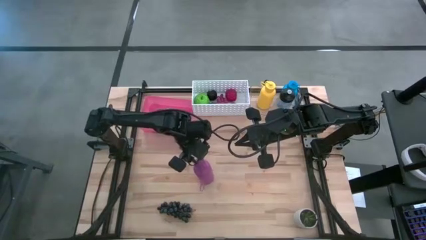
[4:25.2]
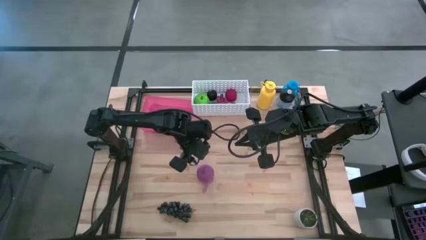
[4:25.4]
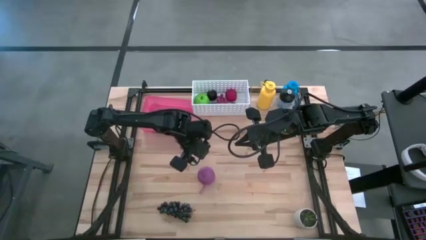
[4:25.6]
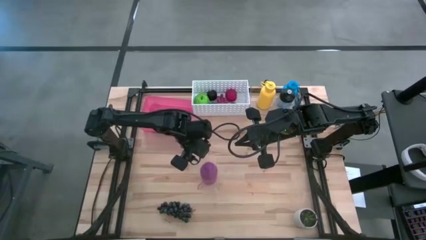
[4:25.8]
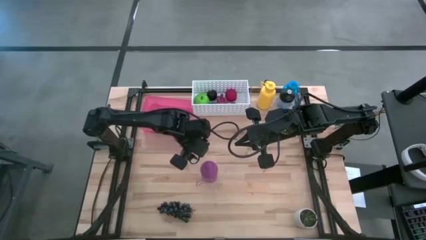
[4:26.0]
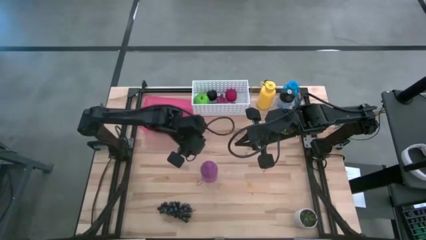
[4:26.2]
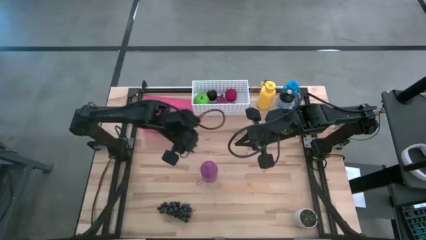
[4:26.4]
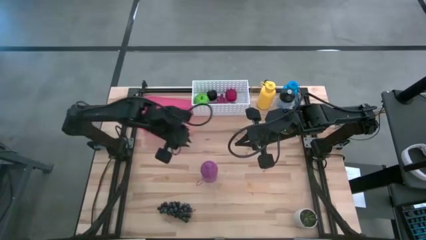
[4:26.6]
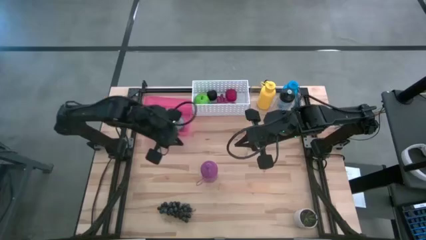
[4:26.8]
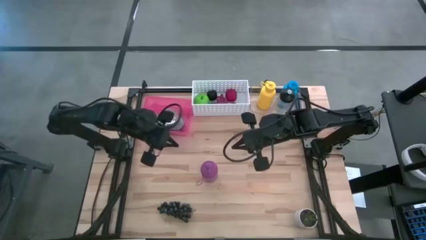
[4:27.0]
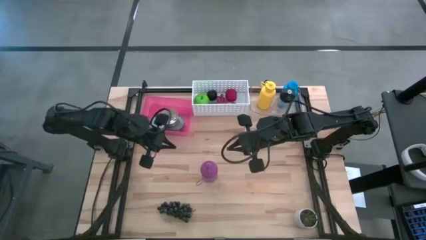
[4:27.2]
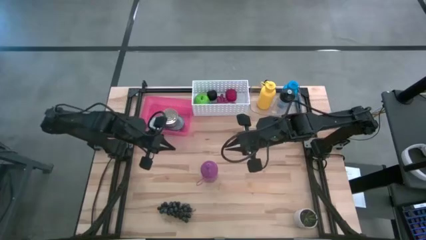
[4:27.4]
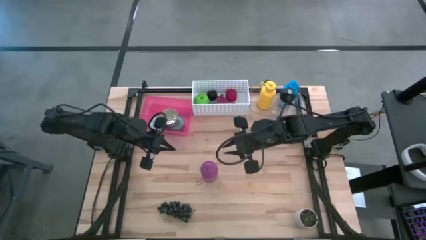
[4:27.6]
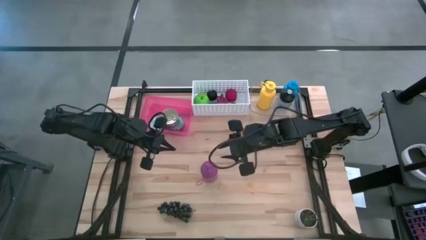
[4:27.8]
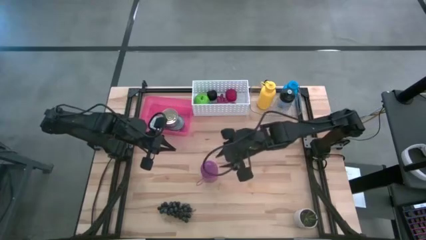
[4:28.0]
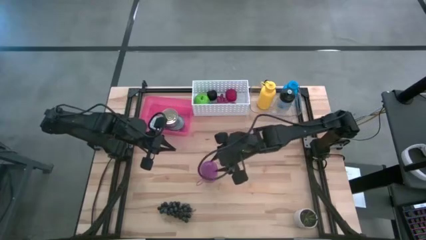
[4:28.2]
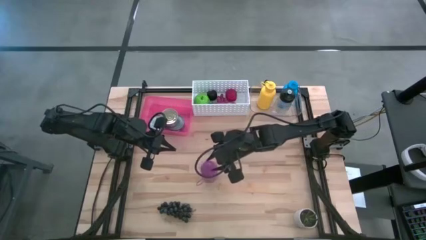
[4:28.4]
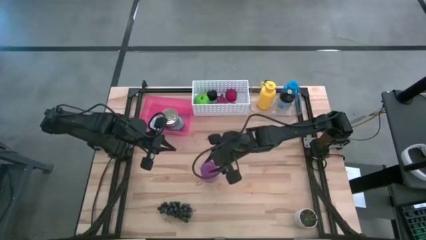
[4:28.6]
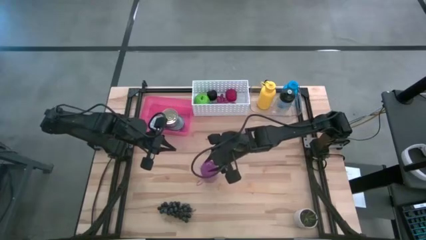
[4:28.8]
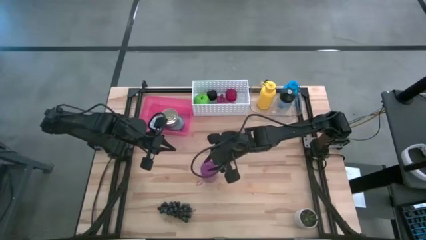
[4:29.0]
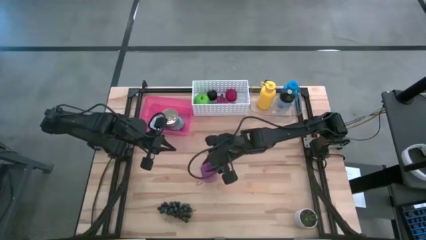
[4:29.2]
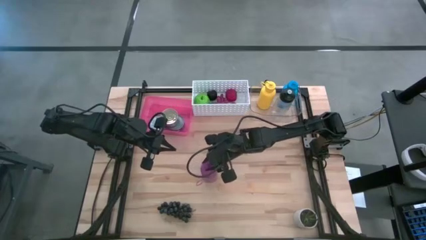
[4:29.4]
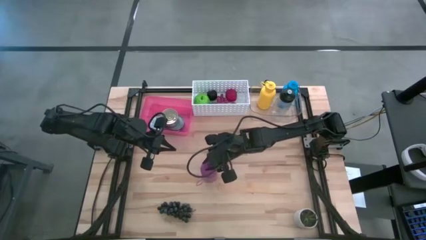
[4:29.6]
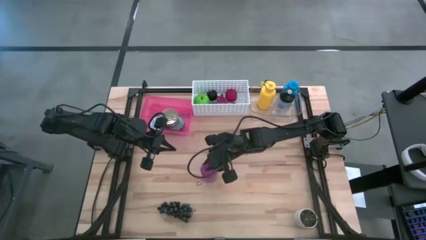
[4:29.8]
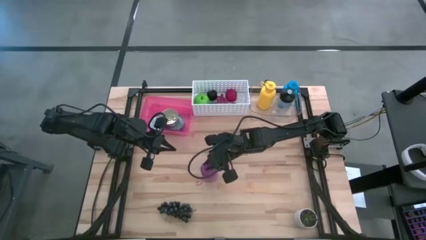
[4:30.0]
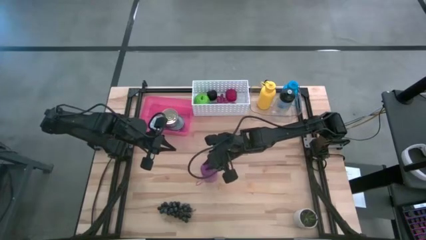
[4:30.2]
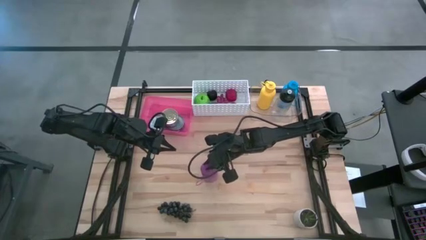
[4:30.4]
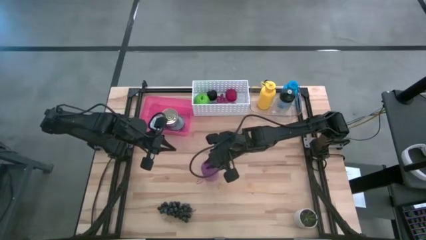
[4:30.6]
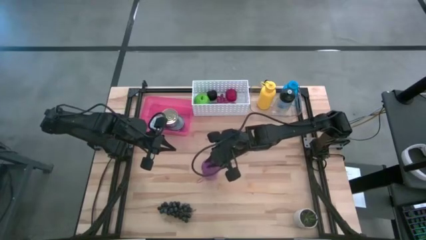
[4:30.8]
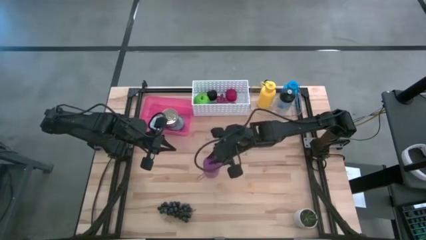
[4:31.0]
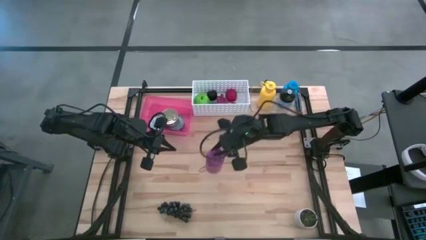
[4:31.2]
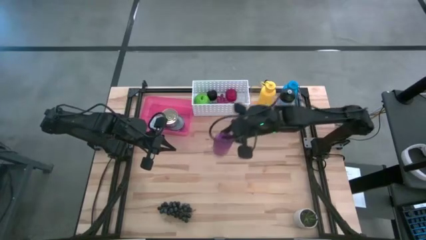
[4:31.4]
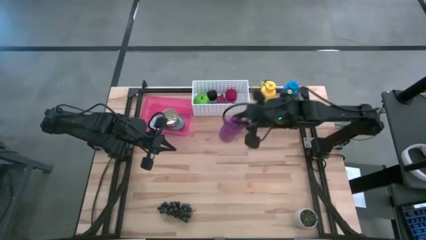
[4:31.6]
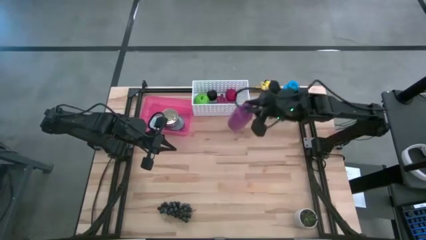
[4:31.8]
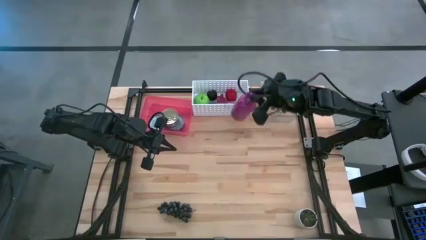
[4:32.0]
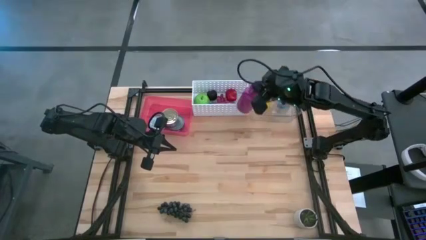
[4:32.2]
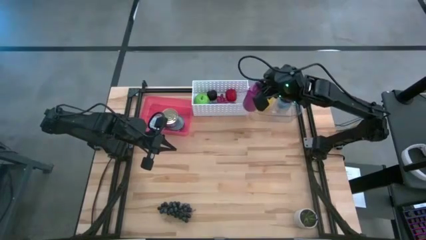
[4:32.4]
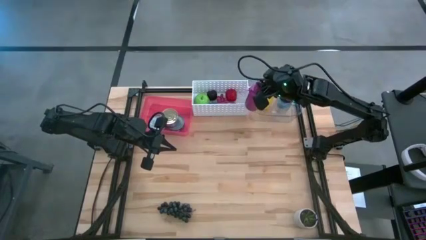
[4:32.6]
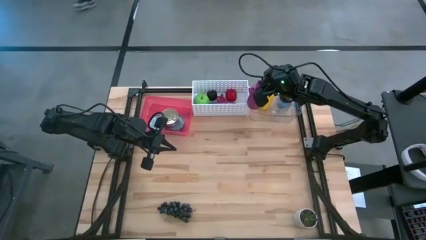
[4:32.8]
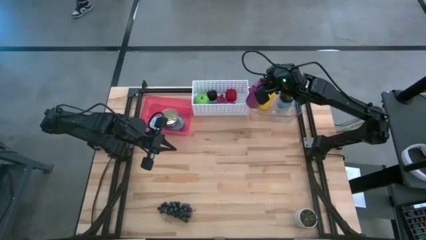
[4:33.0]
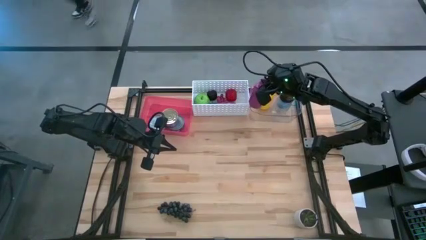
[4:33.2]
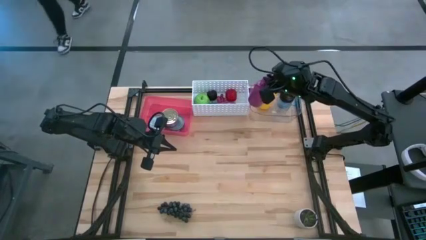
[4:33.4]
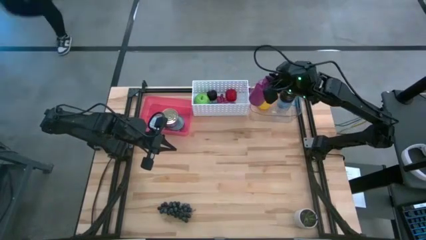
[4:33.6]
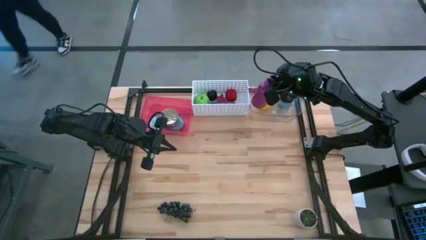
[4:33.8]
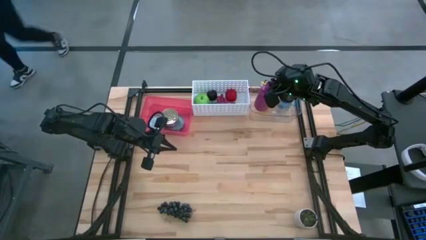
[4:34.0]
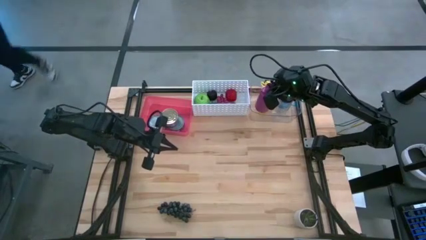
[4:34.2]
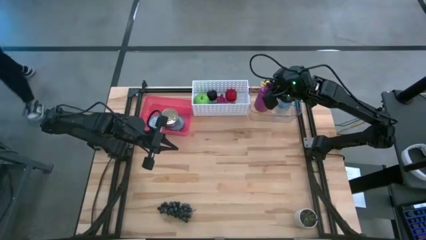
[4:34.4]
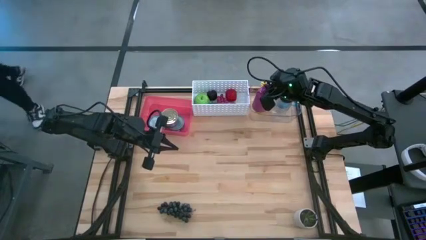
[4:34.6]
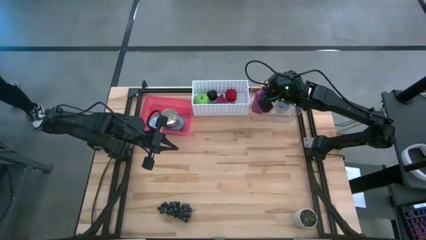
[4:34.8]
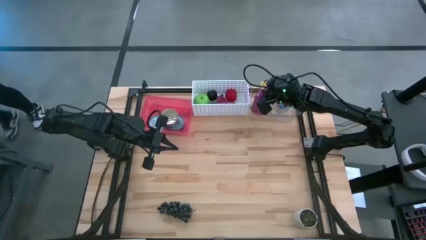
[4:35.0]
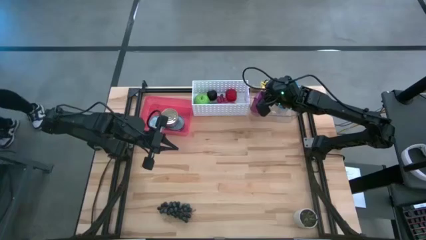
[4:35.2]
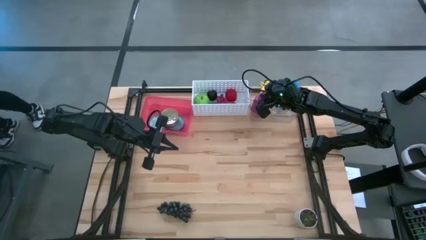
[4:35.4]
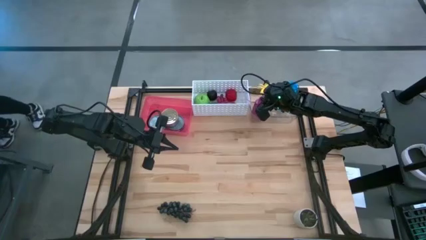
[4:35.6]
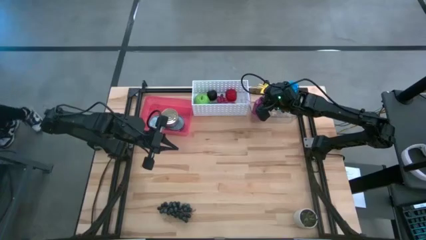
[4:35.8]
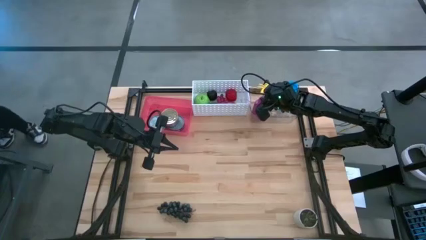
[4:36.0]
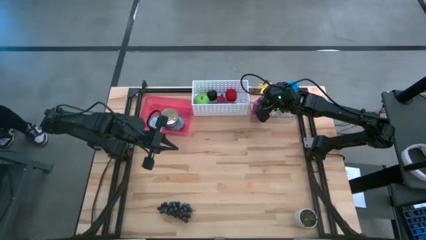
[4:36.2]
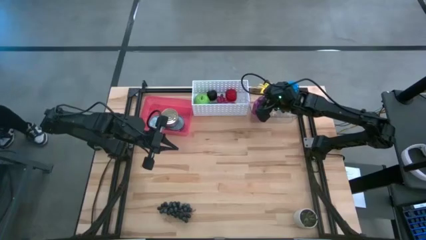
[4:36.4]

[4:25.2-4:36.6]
Task: Pick & Place Food Item
Put the purple water bottle into the transparent bin

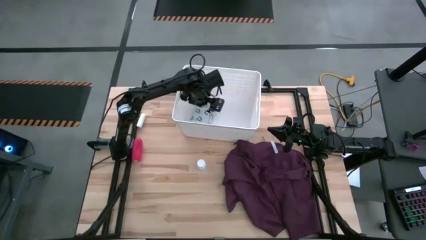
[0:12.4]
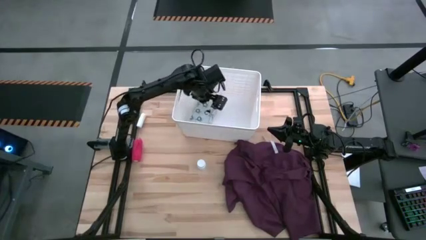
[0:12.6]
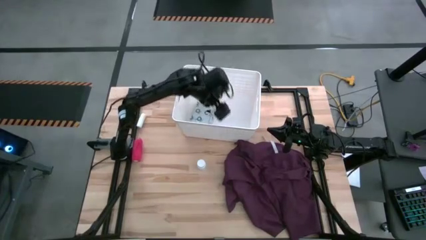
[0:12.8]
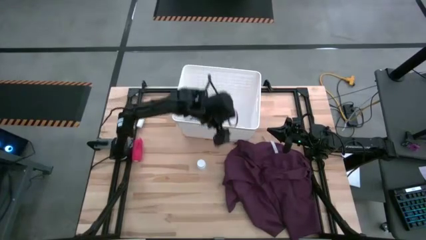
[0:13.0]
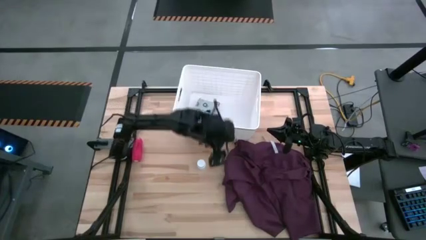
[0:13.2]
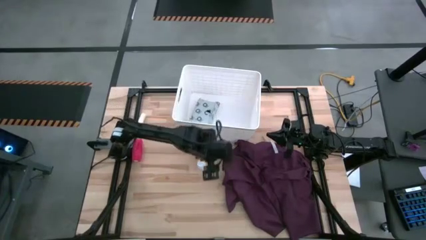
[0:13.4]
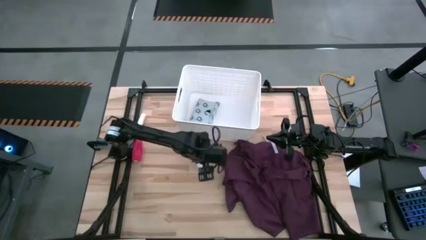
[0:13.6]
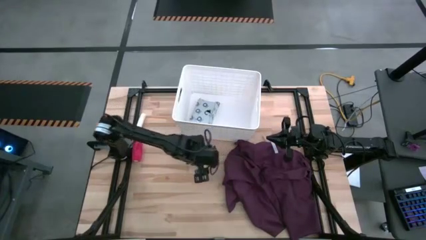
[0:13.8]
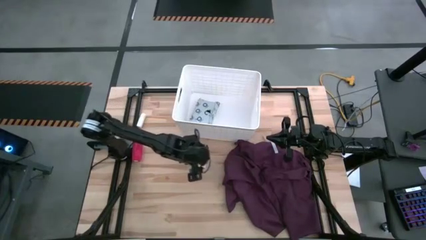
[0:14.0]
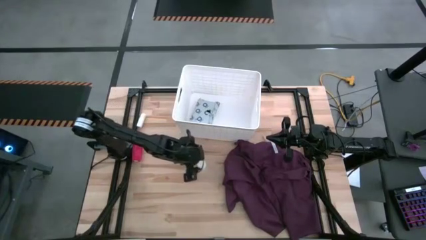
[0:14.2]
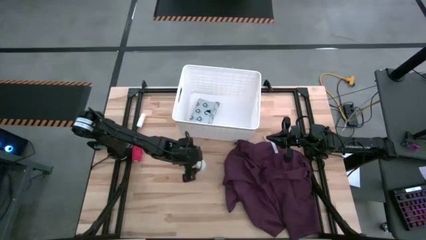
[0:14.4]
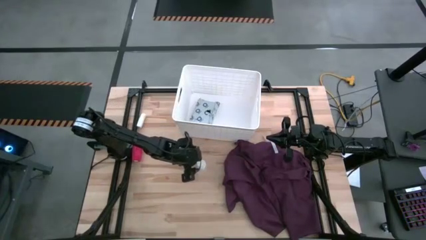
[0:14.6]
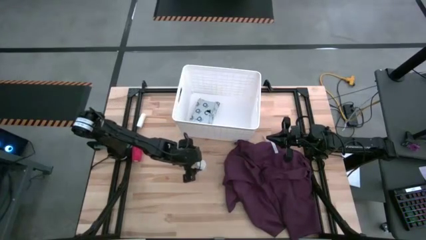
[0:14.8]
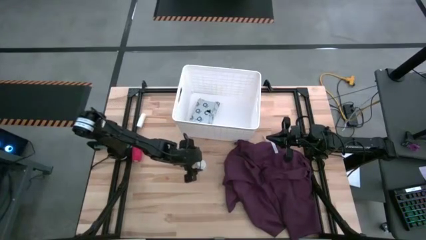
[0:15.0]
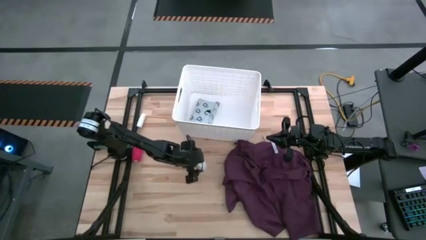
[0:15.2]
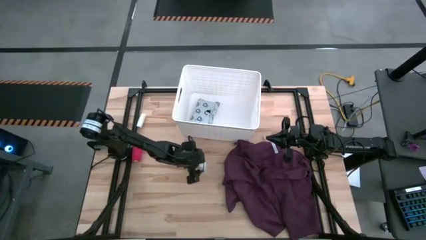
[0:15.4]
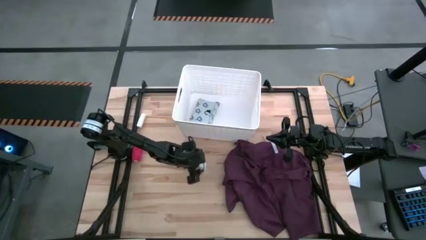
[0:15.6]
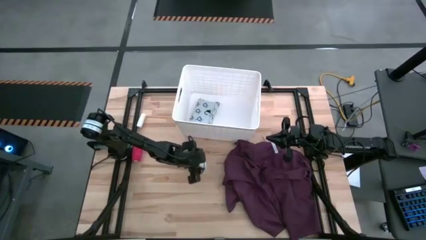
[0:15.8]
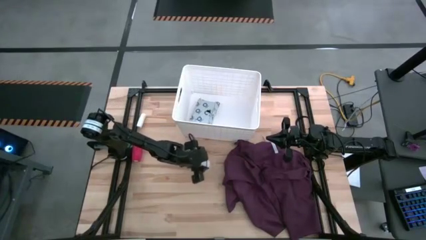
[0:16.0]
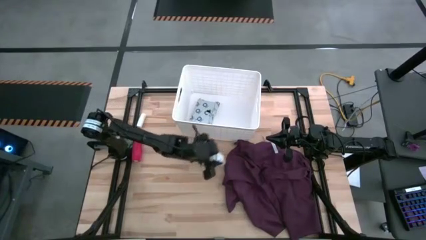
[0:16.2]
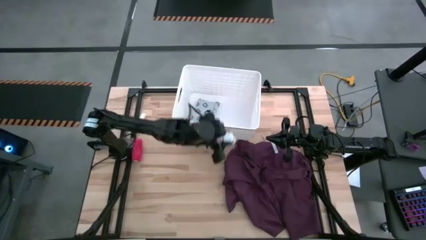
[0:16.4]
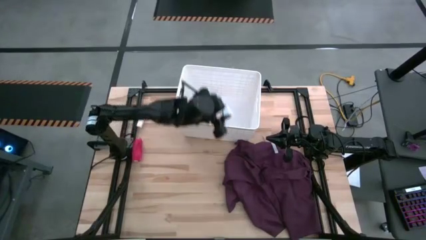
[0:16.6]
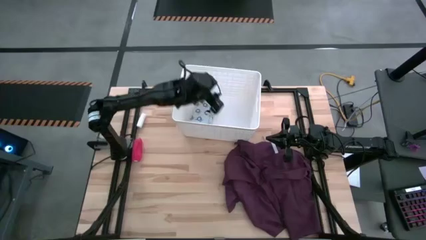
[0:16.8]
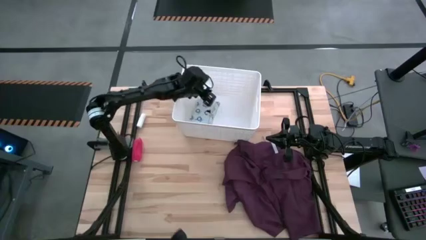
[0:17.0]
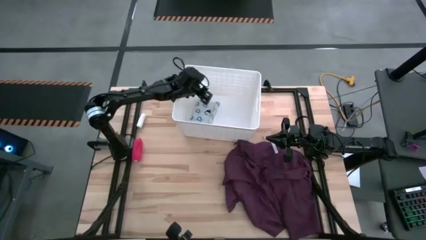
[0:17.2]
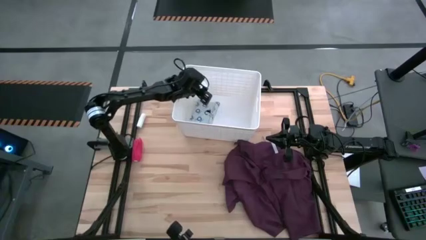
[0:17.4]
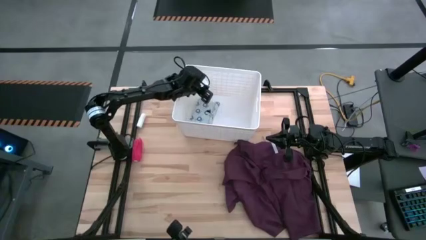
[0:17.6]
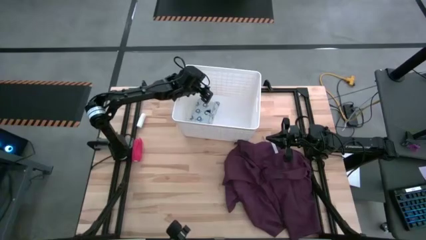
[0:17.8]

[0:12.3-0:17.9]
Task: Pick & place medical supplies in basket/bin
Put the medicine bottle into the white bin
